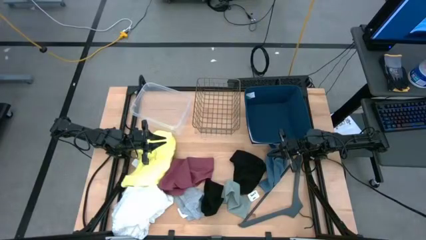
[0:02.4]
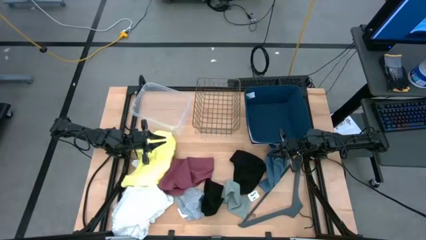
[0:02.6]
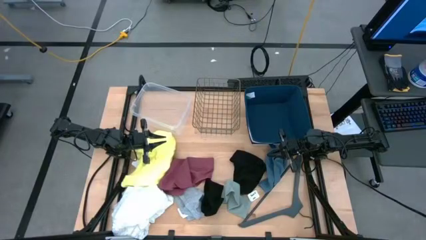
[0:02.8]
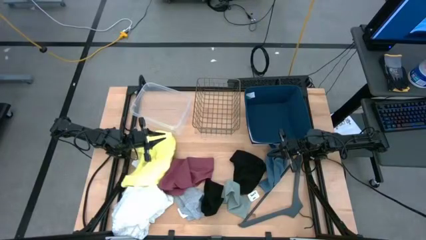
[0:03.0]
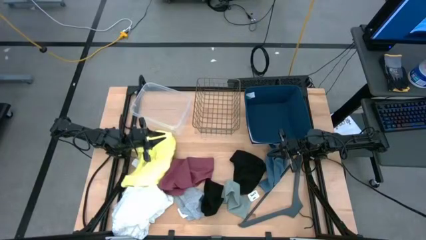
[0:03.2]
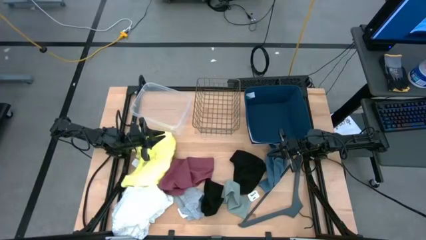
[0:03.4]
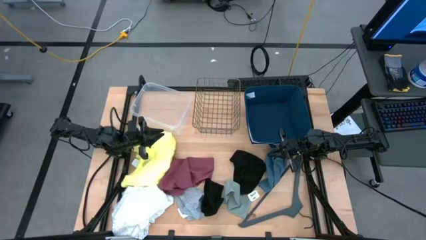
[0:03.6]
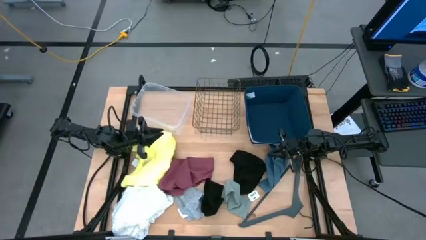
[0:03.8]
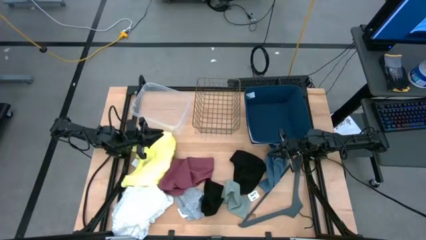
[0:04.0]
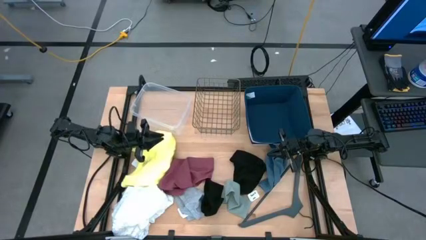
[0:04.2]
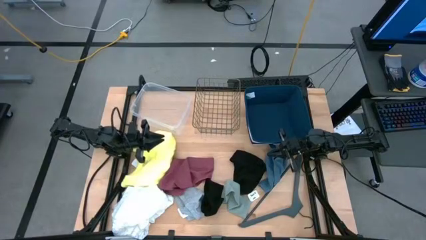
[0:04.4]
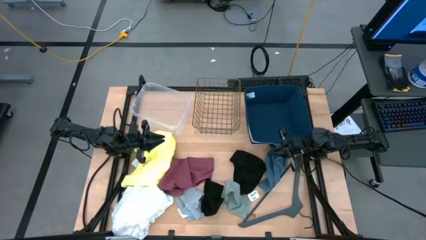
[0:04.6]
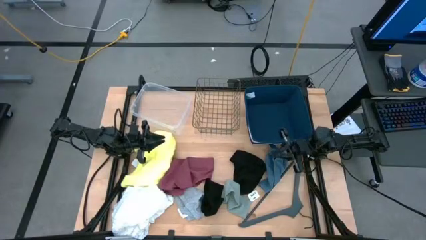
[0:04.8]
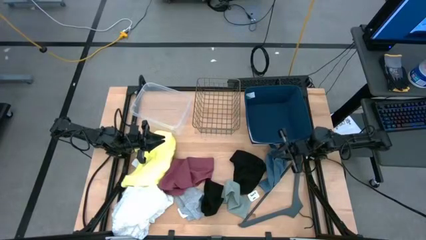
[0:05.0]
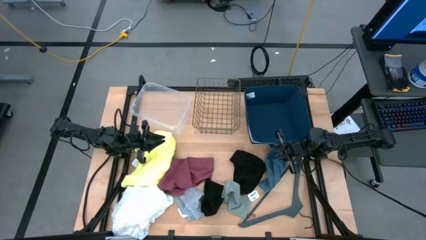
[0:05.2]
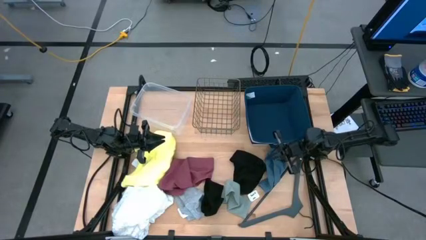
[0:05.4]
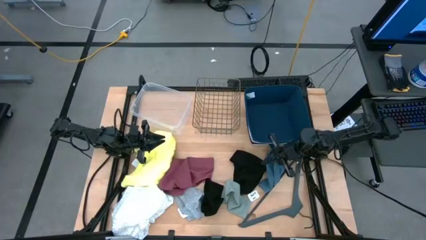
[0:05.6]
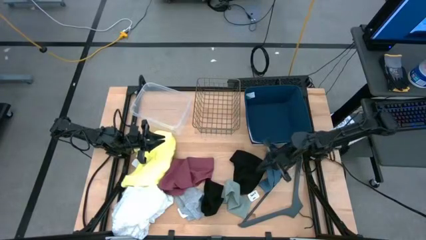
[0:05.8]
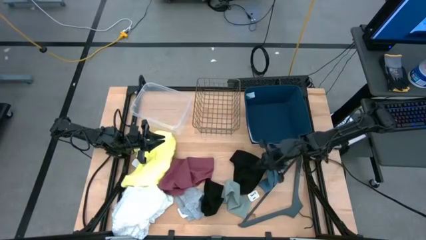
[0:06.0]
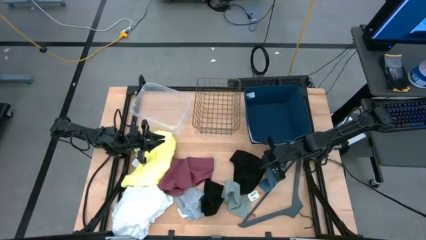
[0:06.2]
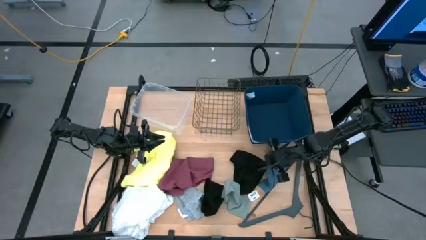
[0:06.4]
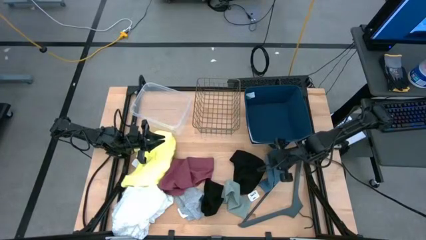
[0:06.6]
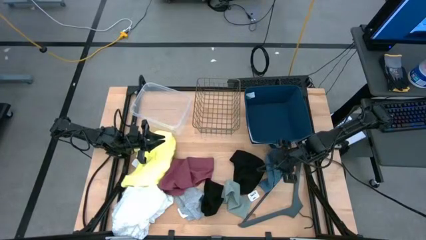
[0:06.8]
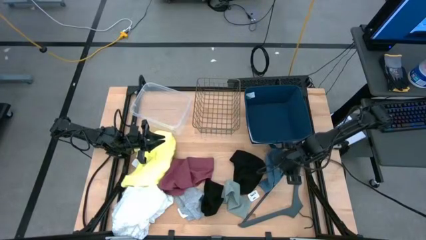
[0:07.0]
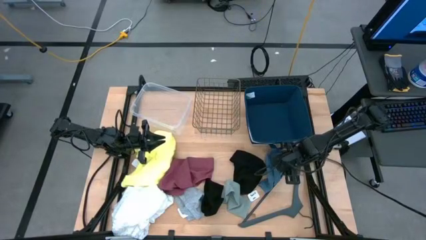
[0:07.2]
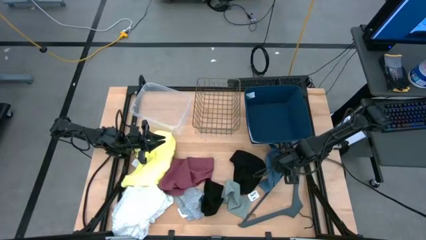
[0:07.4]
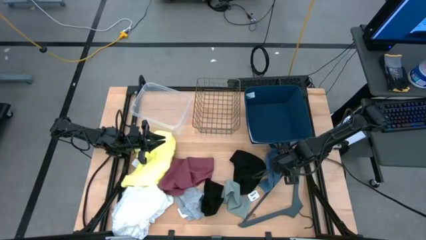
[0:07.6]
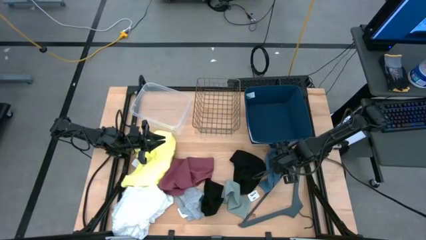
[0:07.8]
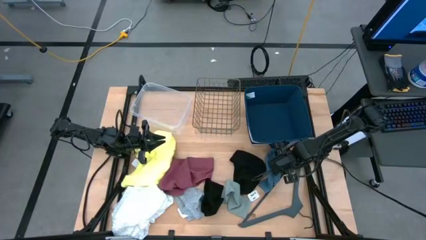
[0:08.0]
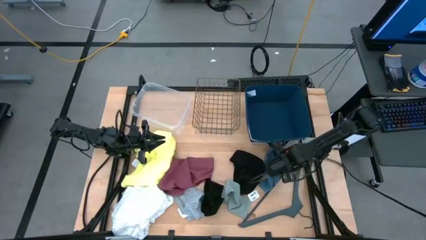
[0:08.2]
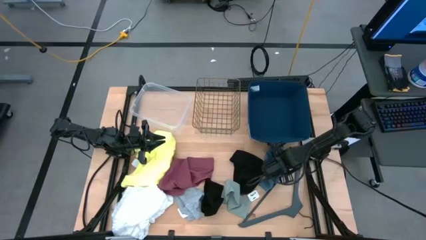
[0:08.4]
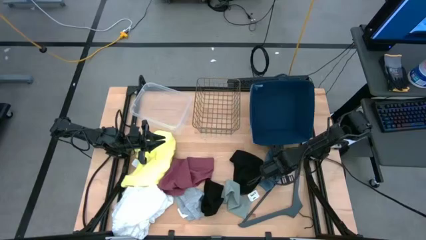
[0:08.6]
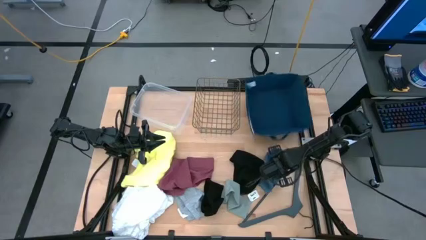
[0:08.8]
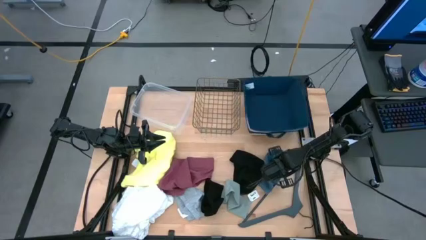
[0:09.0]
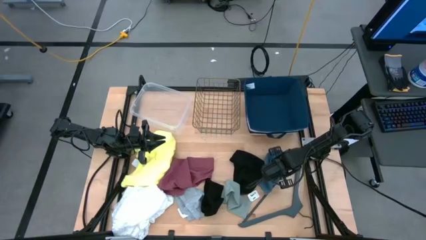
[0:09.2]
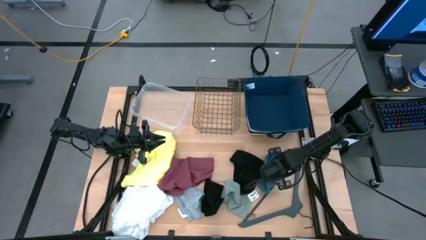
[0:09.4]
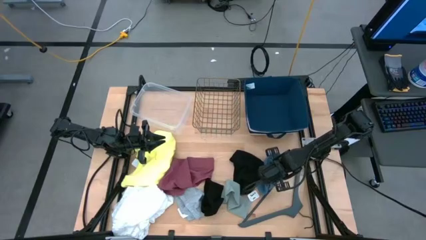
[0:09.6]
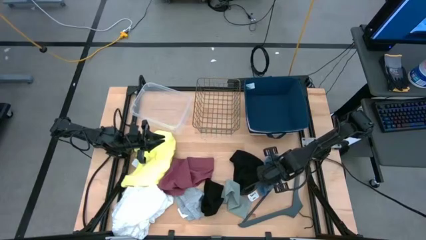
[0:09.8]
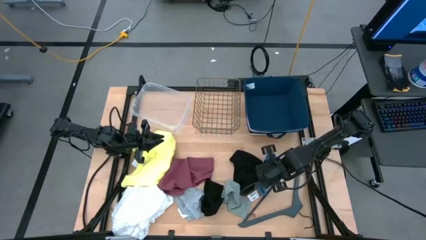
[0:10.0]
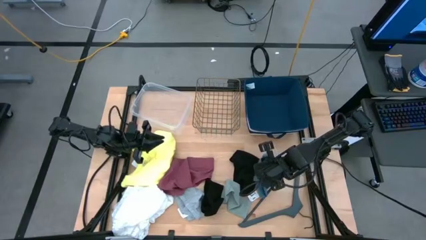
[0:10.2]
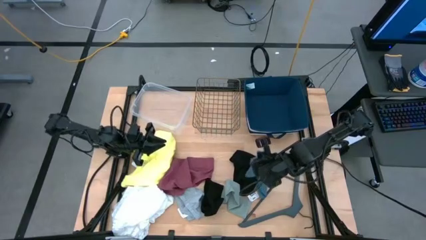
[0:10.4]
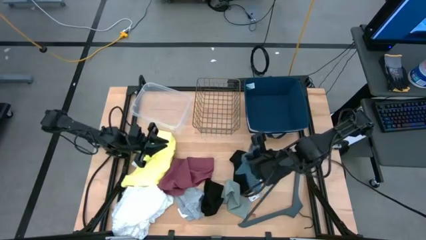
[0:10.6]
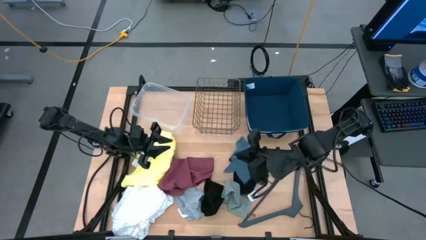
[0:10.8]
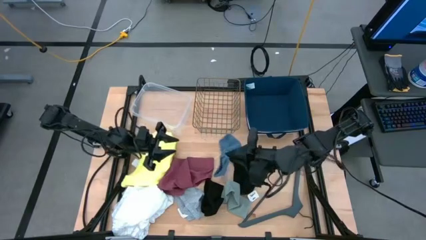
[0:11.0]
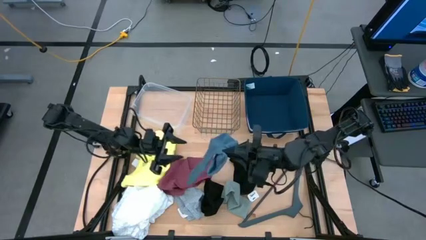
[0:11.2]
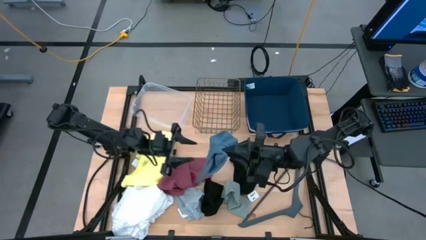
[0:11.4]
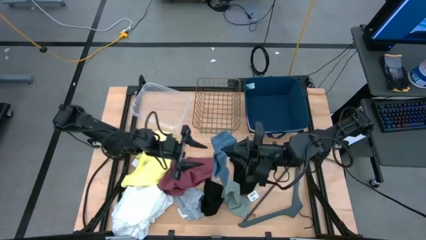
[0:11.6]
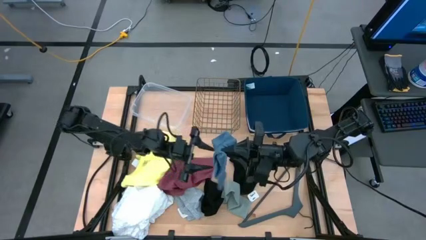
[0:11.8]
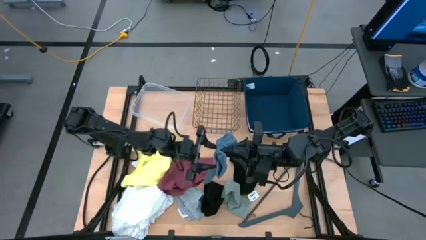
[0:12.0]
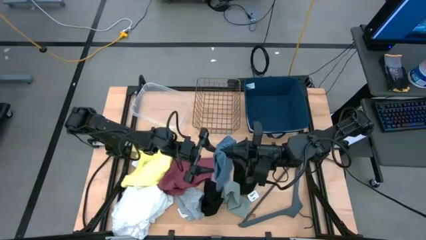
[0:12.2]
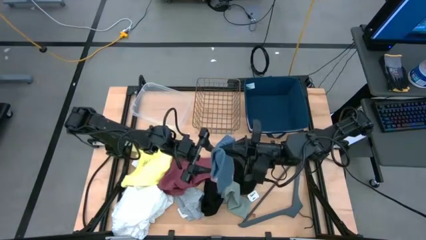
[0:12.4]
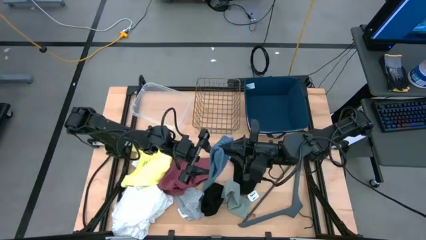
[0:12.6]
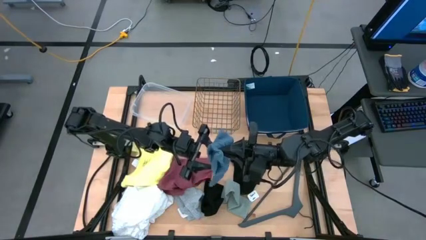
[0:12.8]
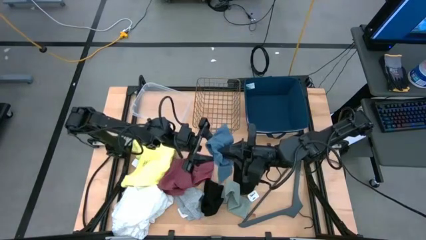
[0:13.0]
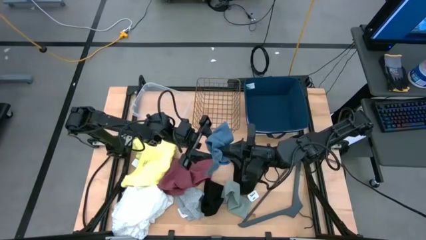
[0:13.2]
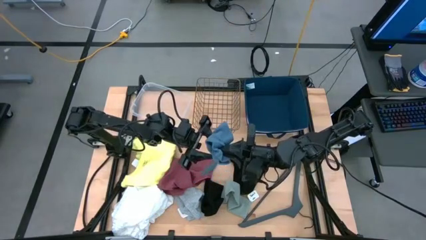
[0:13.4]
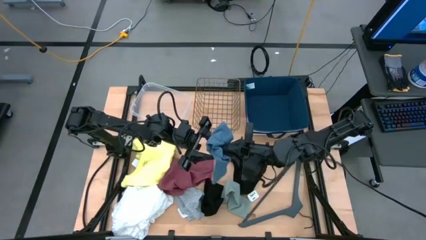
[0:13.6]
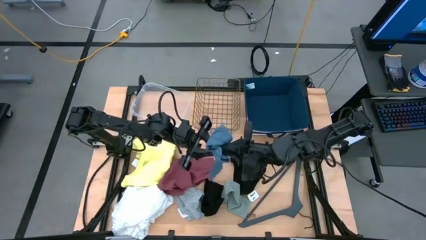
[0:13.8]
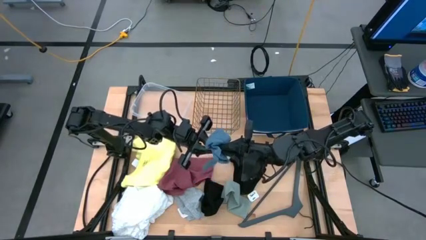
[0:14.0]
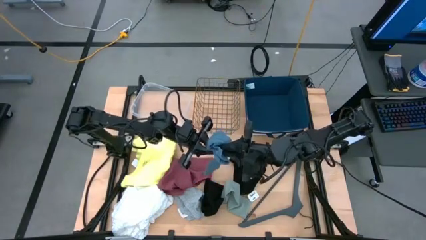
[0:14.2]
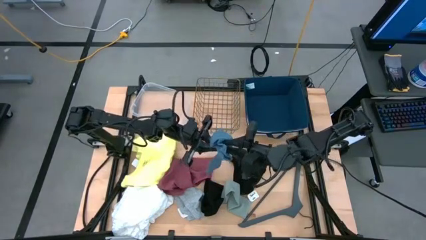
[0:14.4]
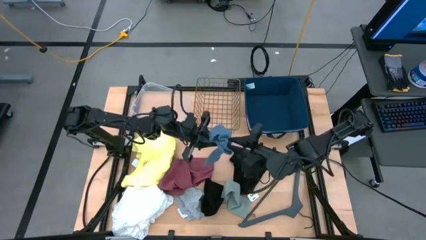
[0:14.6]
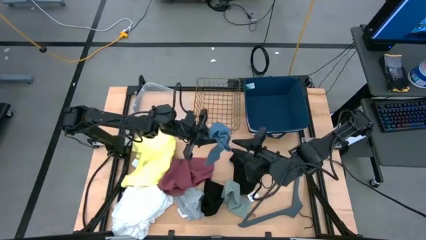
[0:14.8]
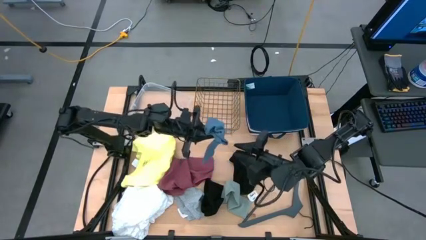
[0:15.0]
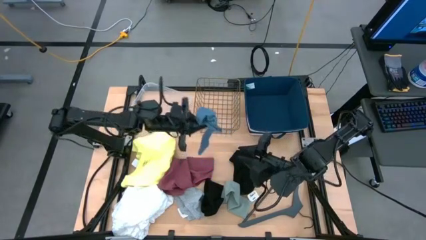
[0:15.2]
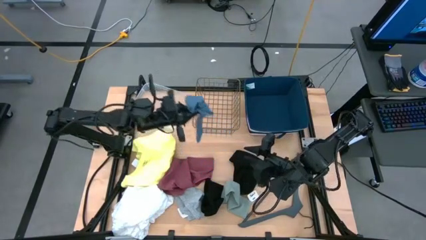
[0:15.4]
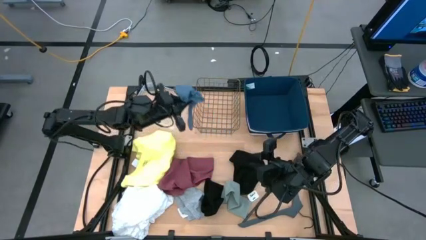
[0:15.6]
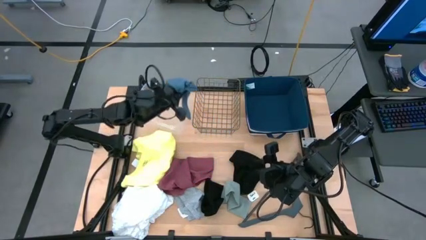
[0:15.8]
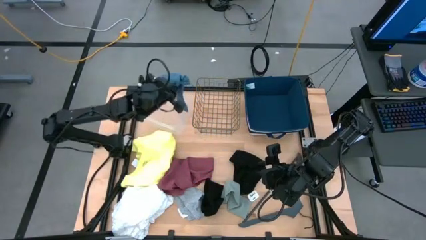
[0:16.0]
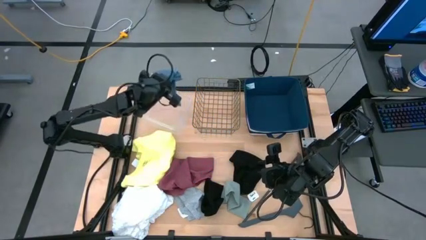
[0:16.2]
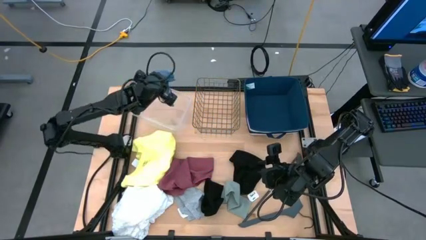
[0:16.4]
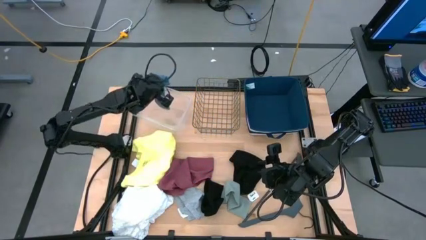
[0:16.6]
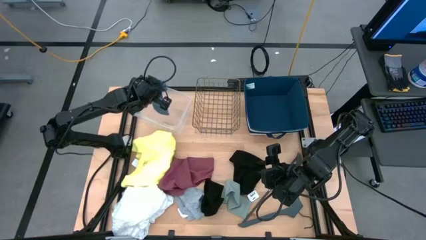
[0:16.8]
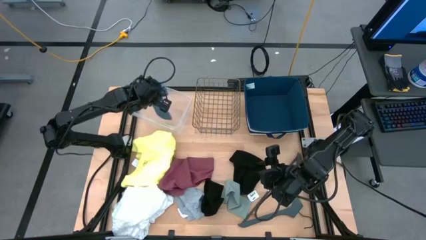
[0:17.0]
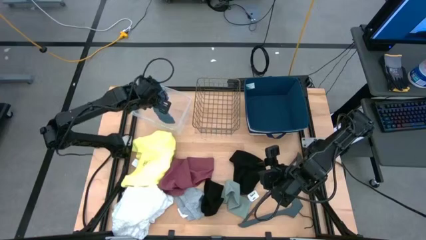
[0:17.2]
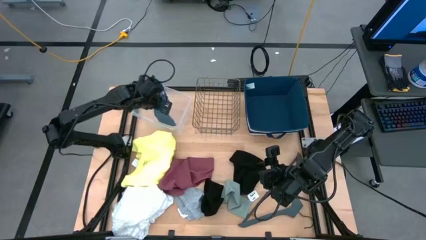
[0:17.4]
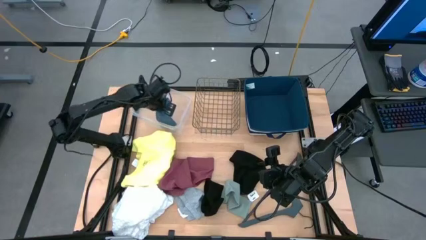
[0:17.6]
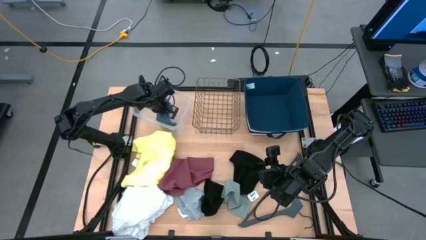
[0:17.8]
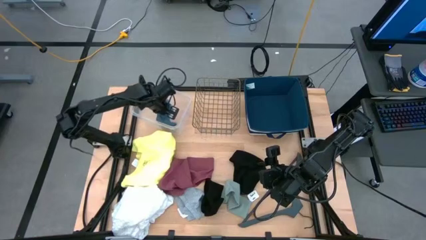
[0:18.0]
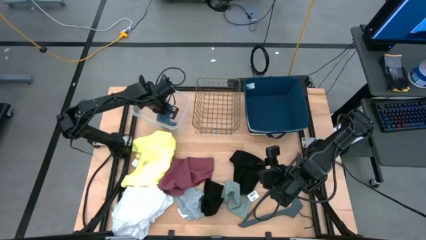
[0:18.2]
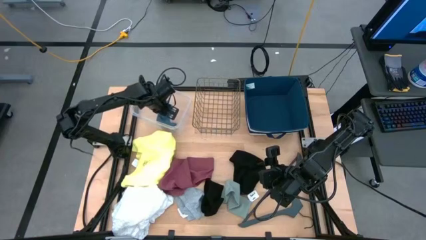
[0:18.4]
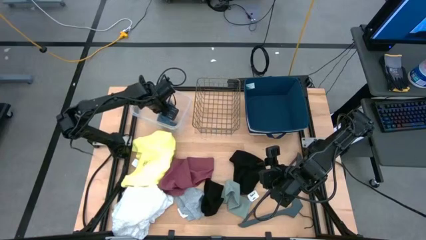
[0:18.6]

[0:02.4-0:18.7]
Task: Pick & Place Cloths
Put the blue sock into the transparent bin
